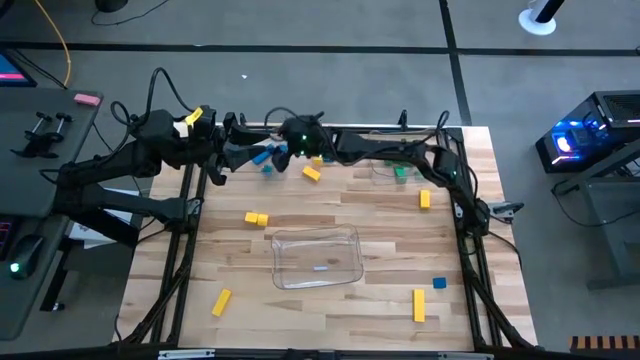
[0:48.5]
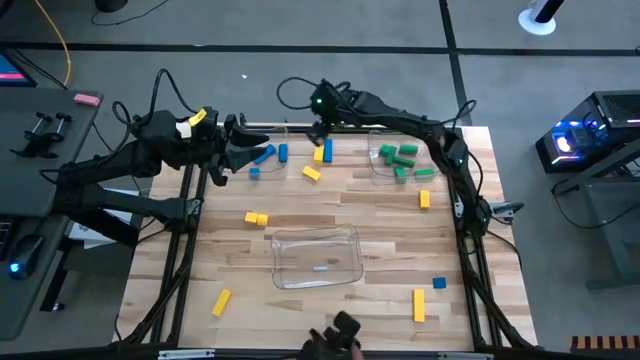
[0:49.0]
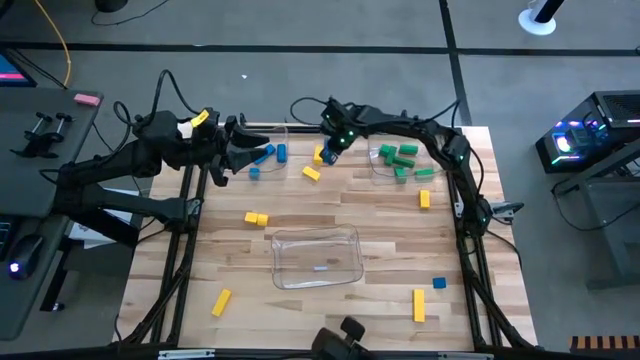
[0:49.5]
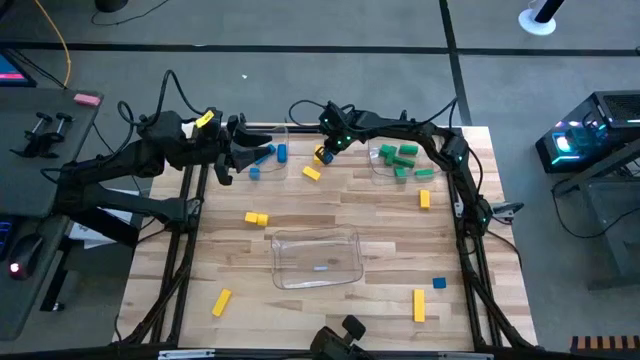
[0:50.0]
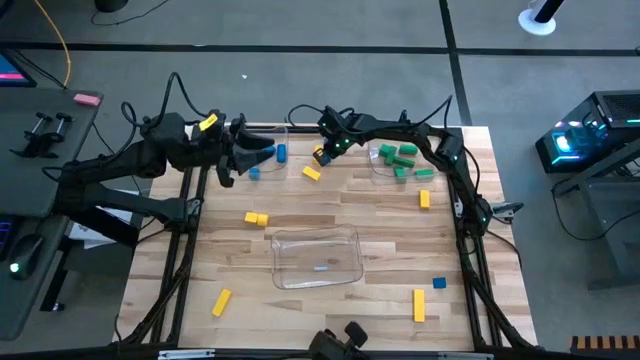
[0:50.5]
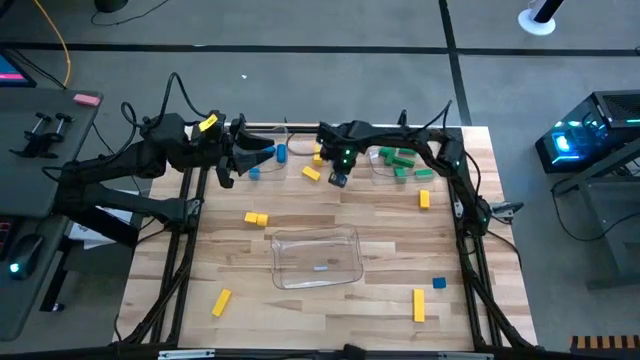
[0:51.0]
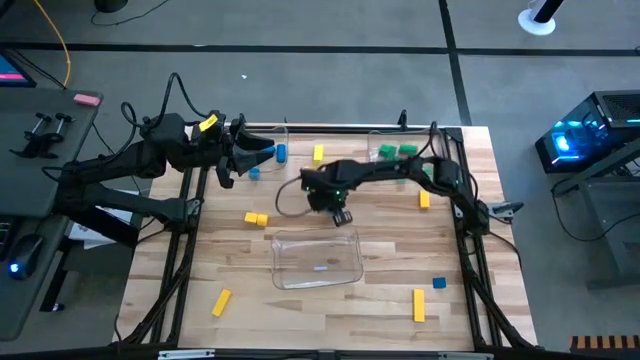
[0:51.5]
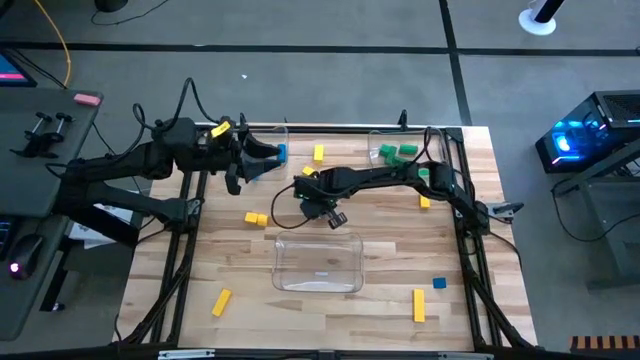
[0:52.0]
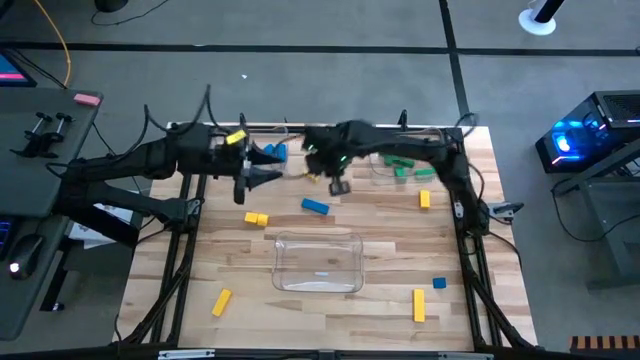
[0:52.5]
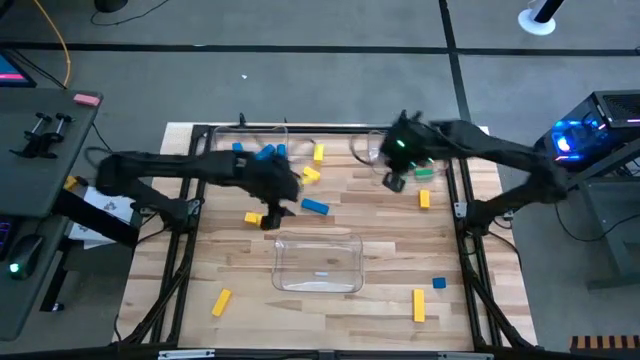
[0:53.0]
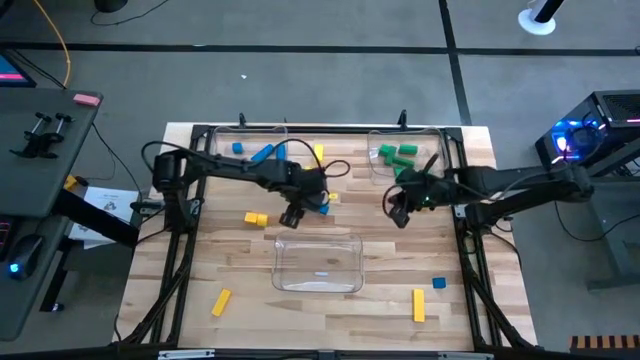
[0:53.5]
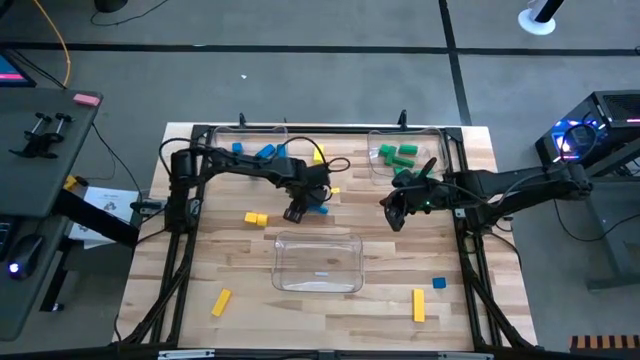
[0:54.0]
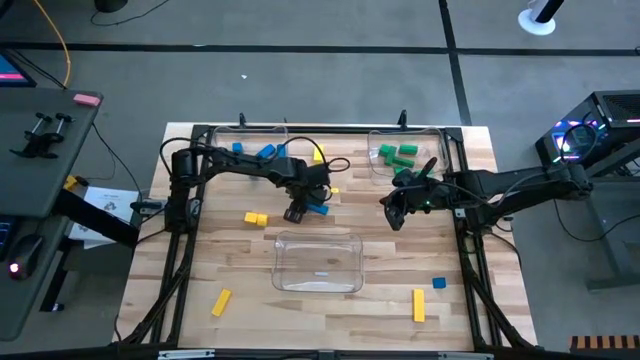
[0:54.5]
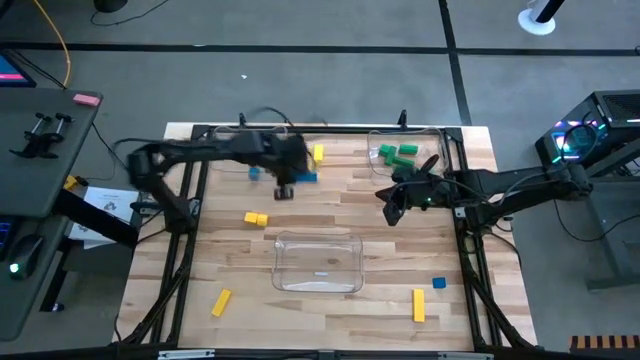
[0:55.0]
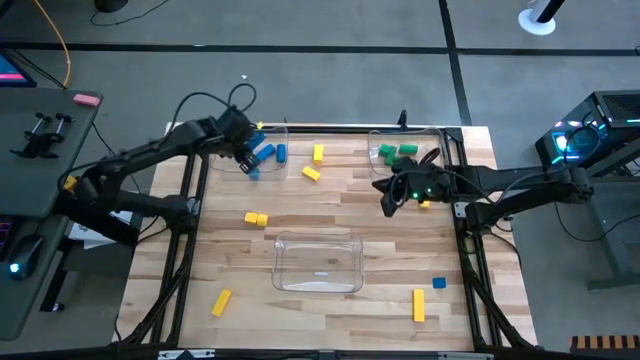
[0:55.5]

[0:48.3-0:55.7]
Task: Sort blocks
Put the blue block into the top left transparent bin

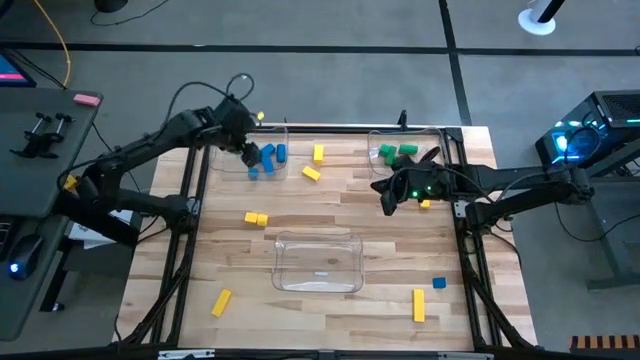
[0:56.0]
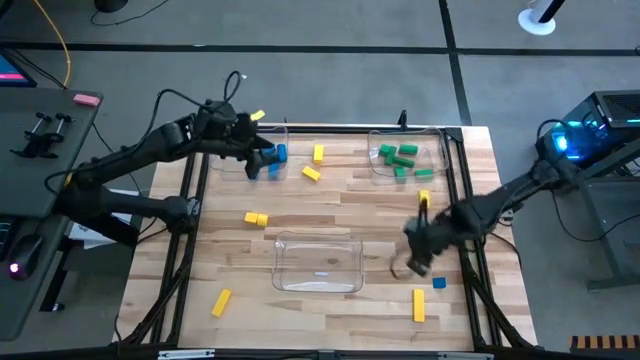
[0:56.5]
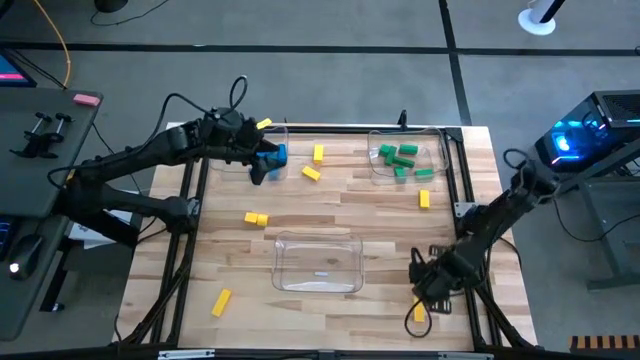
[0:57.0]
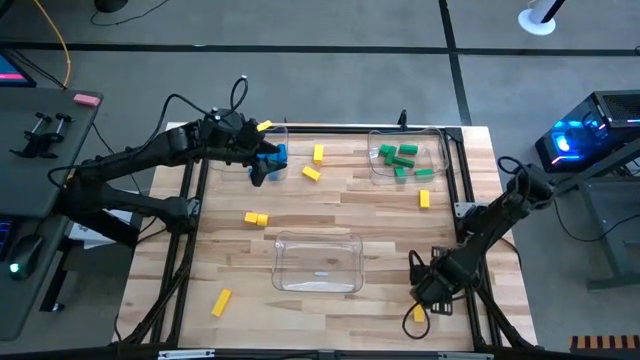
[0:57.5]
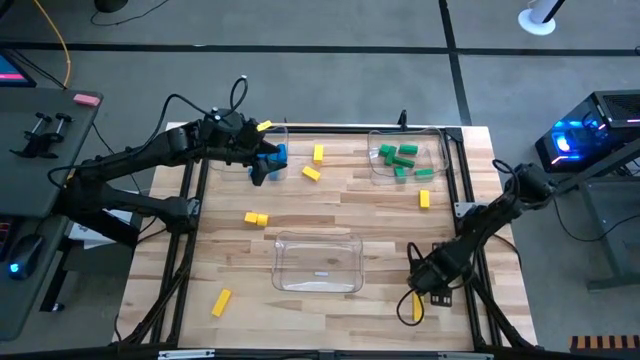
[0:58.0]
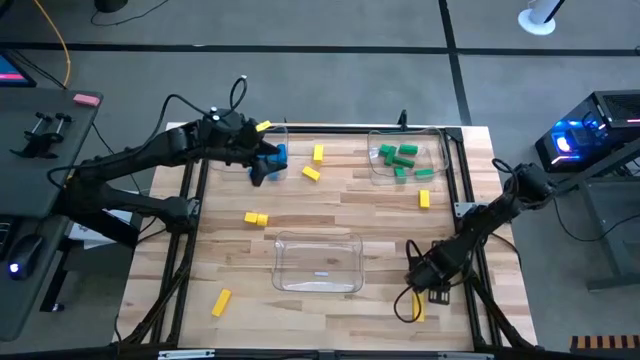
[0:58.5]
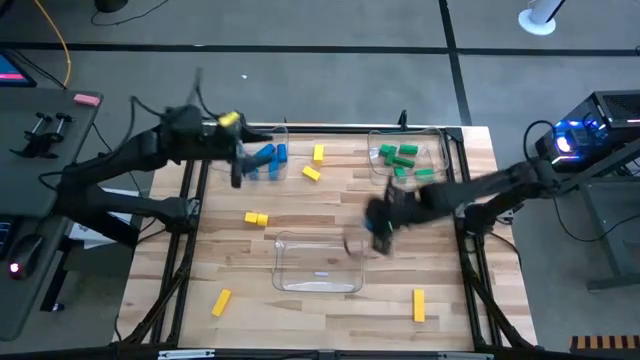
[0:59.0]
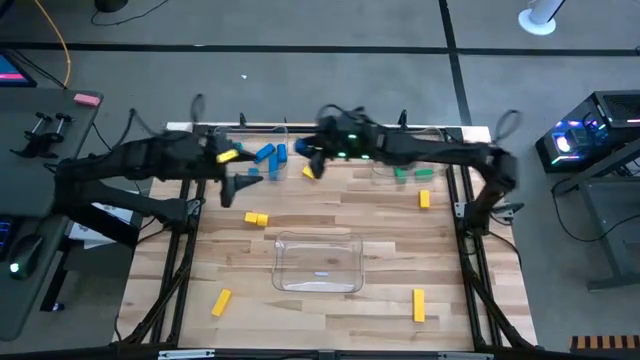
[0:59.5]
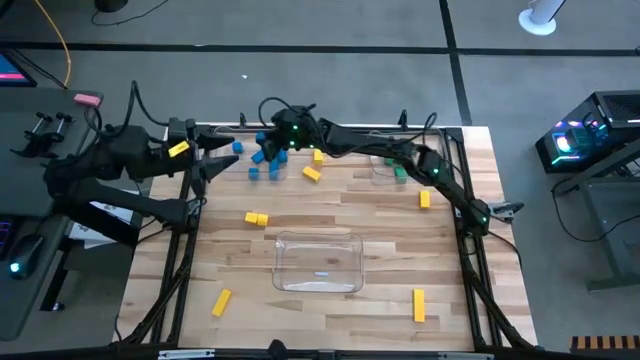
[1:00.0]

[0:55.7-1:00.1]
Put the blue block into the top left transparent bin

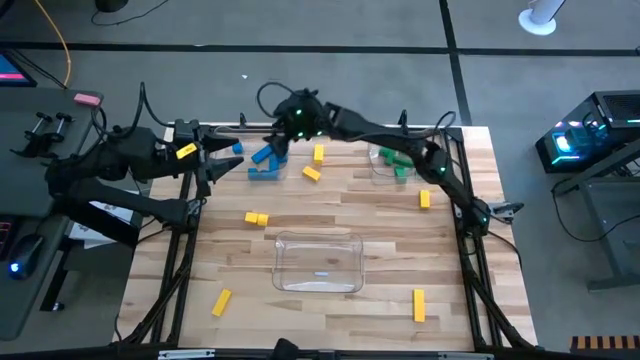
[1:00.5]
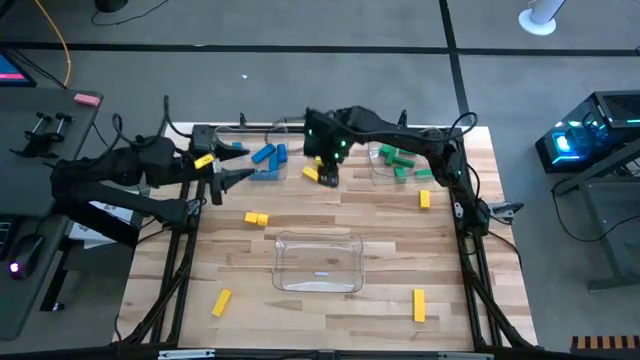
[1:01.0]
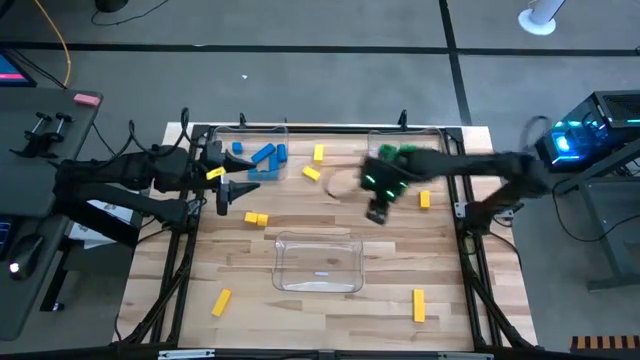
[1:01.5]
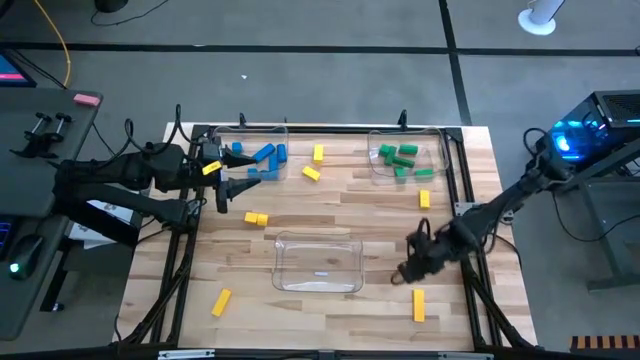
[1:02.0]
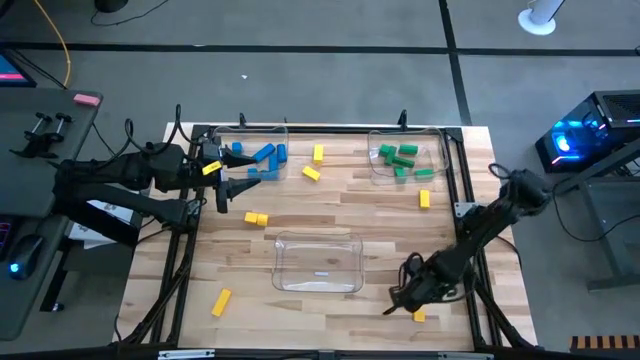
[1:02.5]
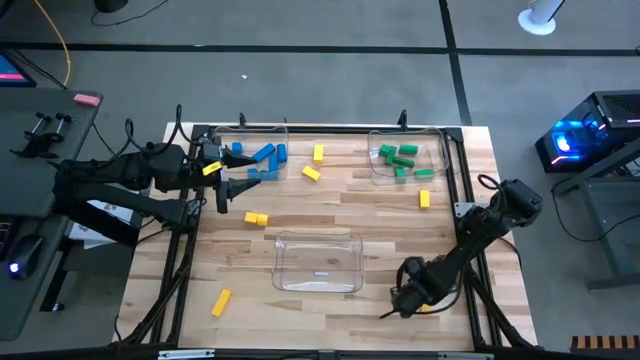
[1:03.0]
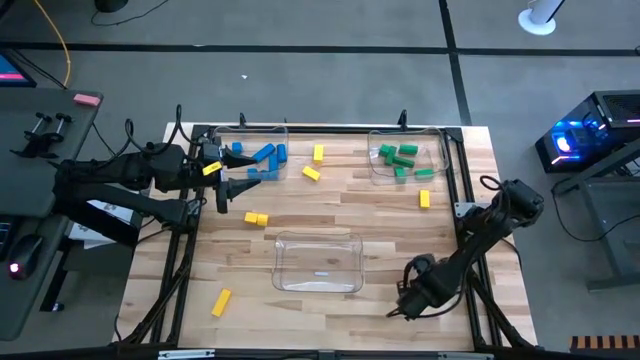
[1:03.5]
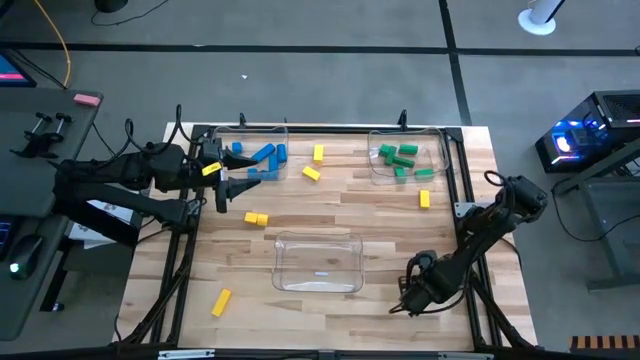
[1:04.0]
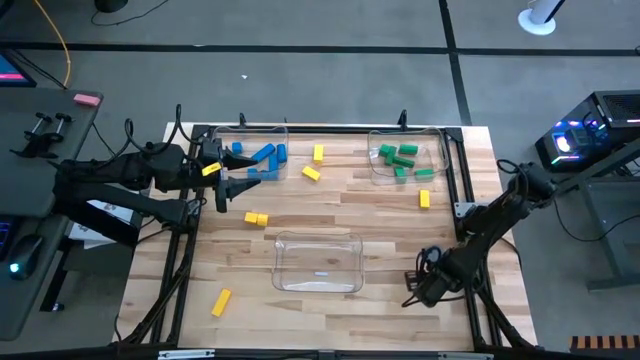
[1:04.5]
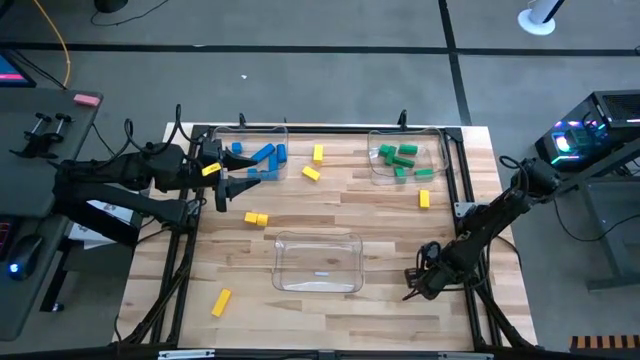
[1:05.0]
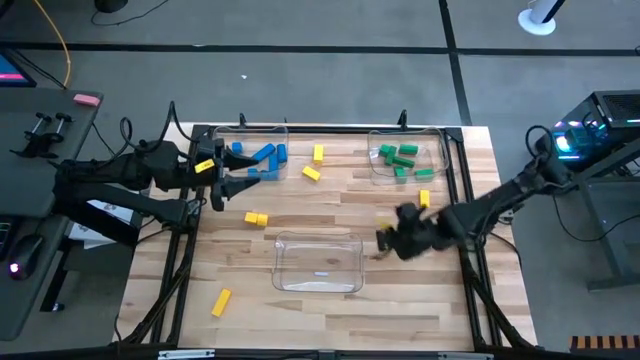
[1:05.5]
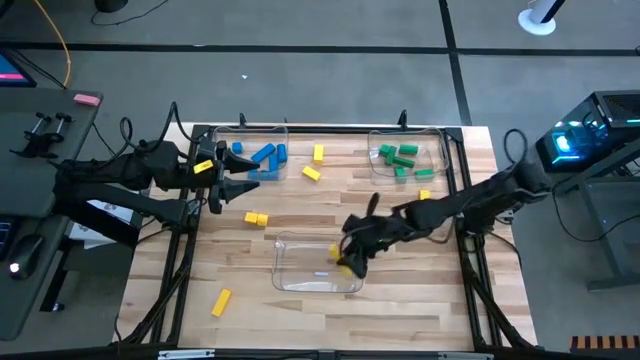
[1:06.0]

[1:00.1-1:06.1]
Put the yellow block into the center transparent bin

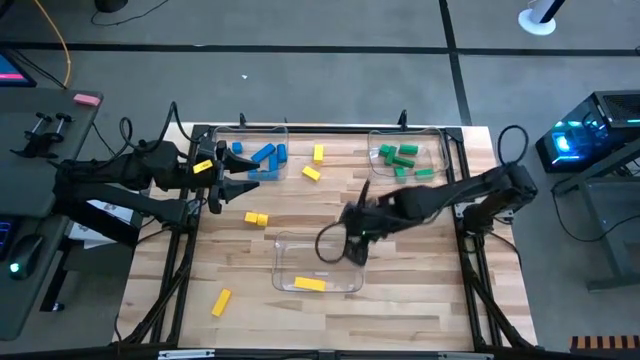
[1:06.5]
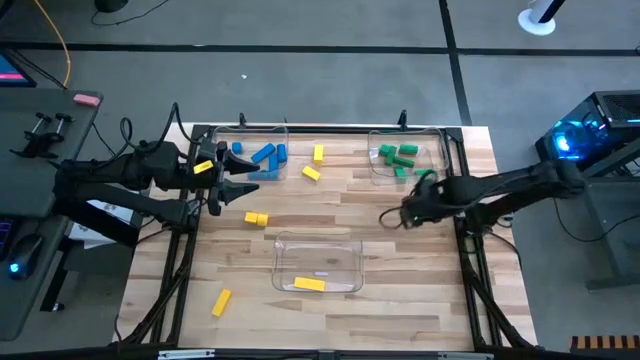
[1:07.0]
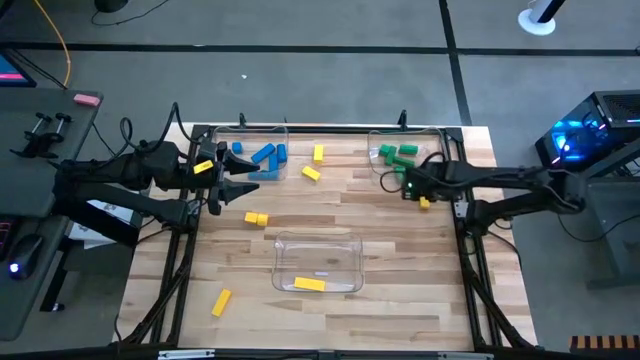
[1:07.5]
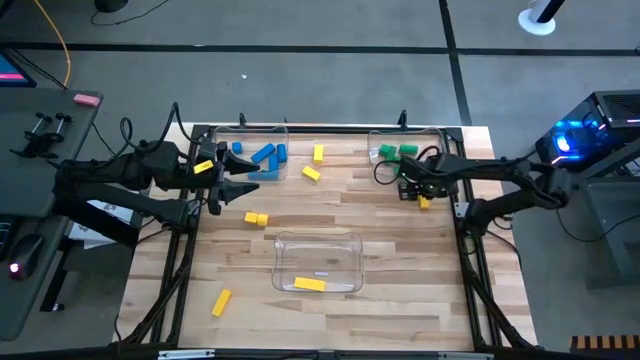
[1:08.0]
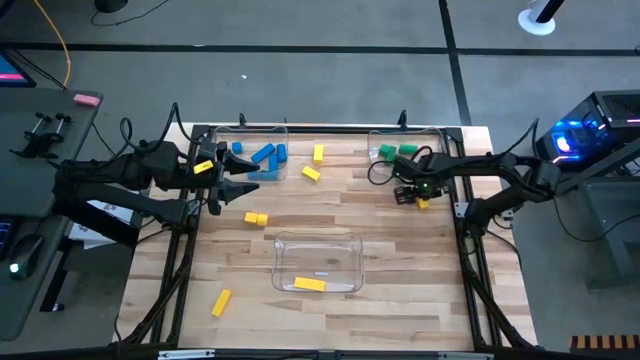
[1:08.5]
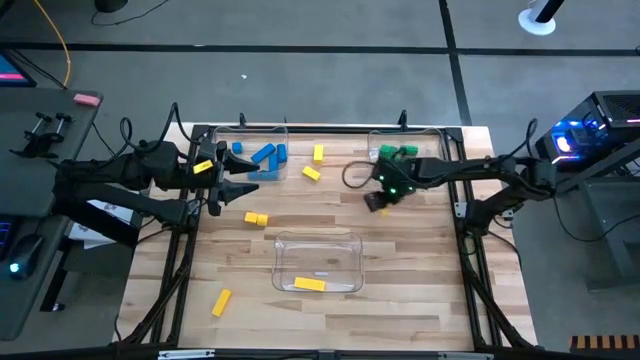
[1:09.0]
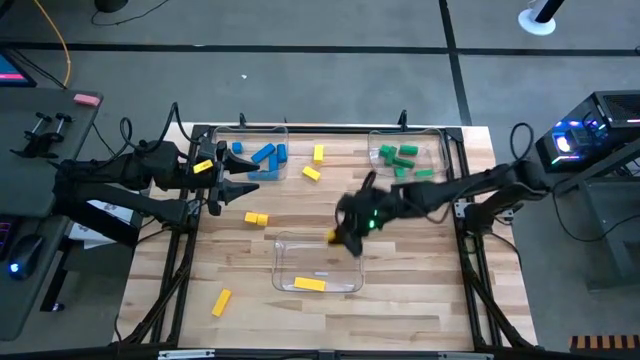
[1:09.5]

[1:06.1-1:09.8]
Put the yellow block into the center transparent bin
